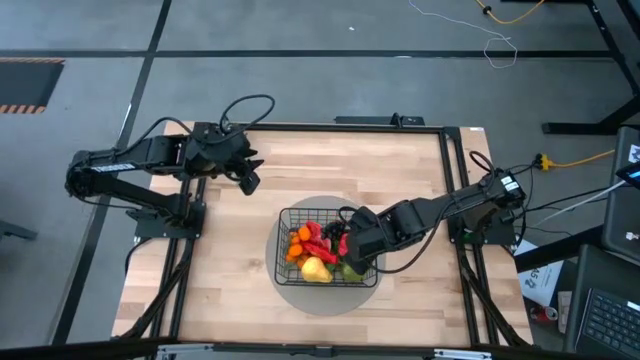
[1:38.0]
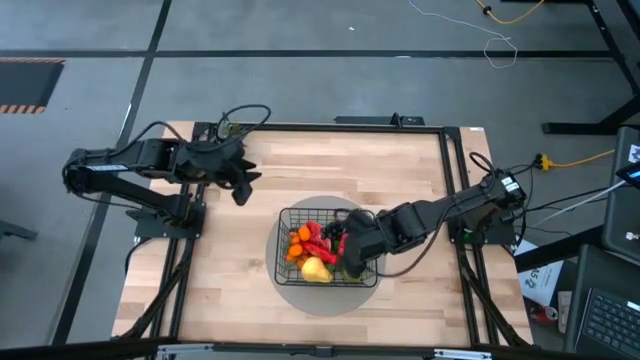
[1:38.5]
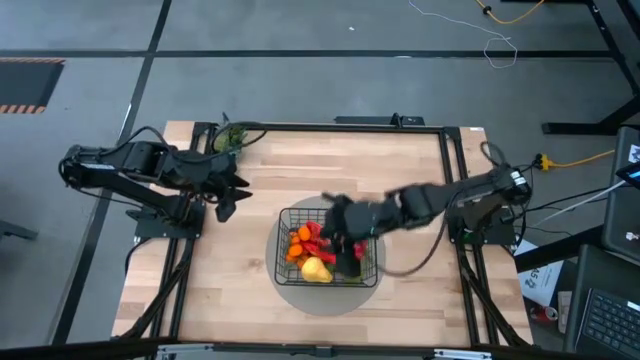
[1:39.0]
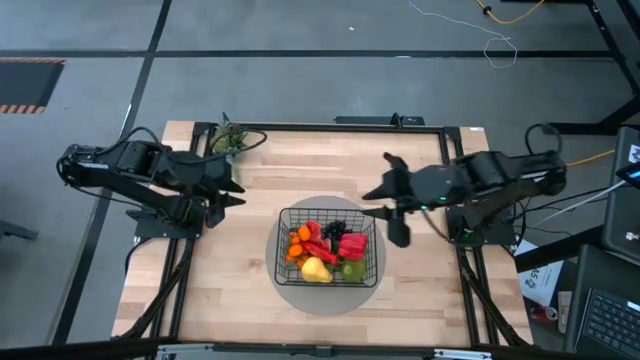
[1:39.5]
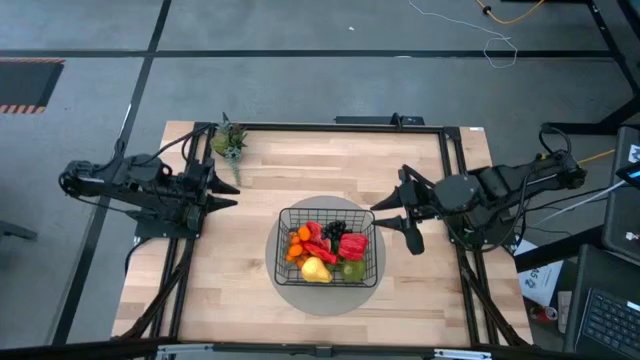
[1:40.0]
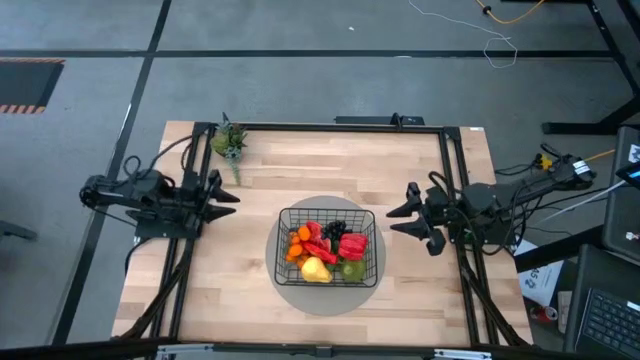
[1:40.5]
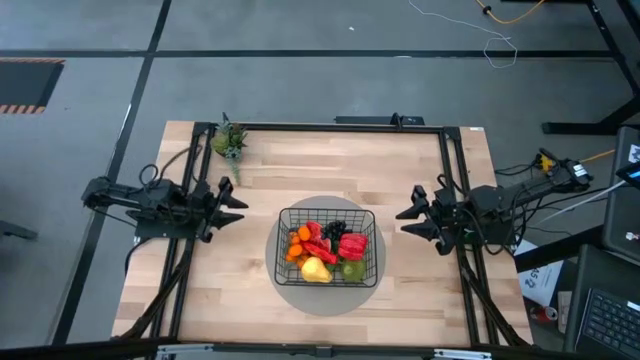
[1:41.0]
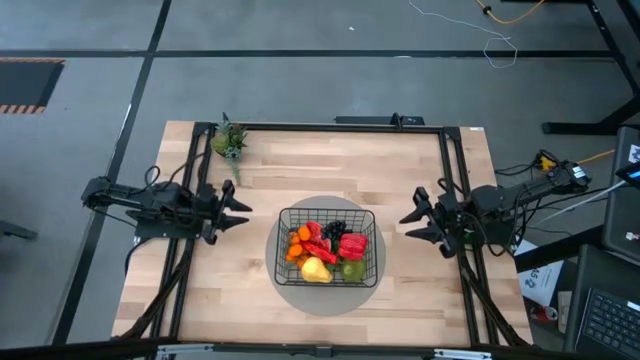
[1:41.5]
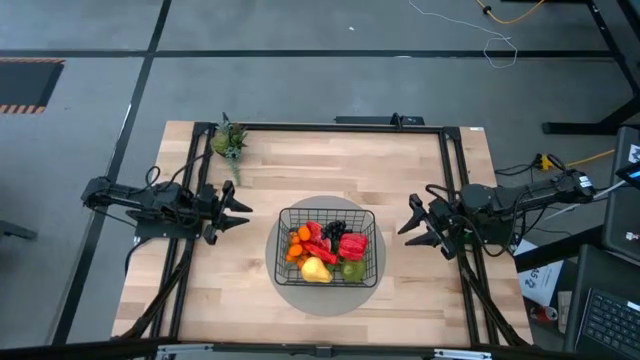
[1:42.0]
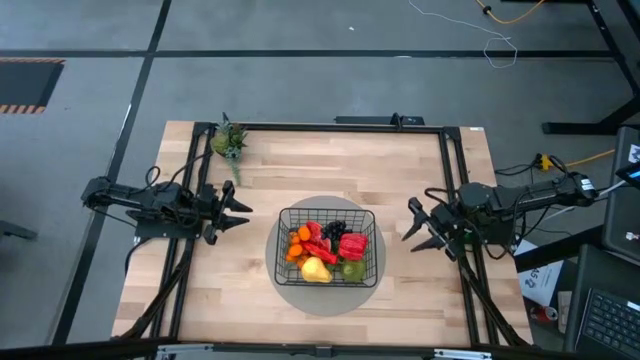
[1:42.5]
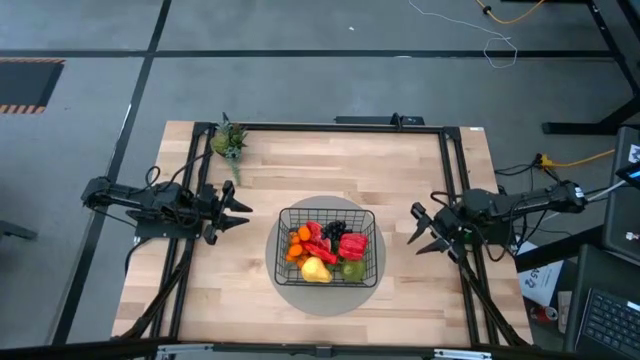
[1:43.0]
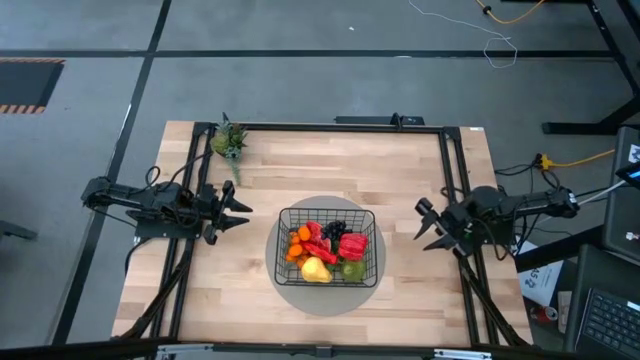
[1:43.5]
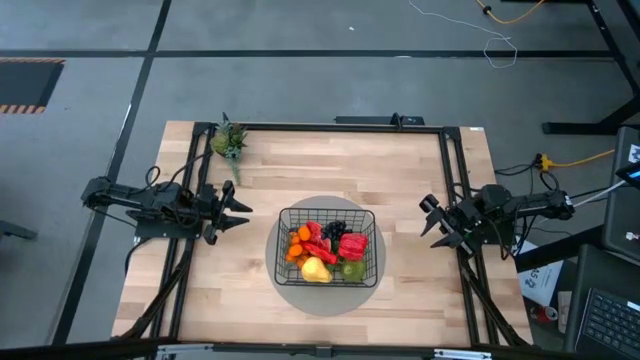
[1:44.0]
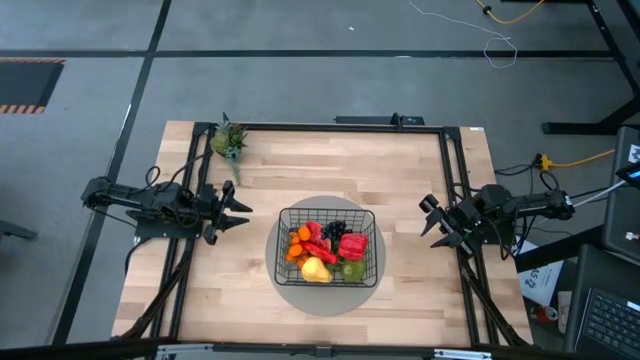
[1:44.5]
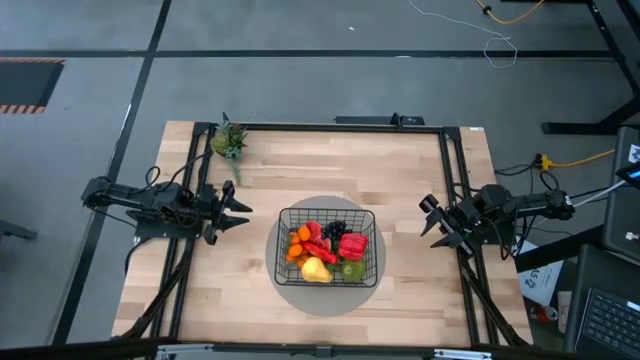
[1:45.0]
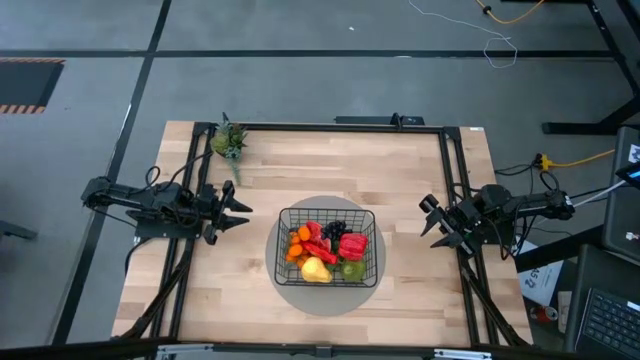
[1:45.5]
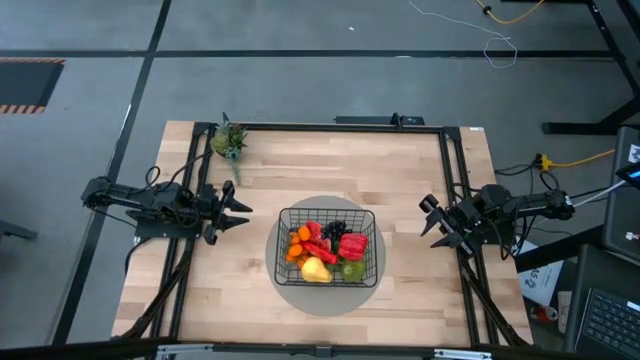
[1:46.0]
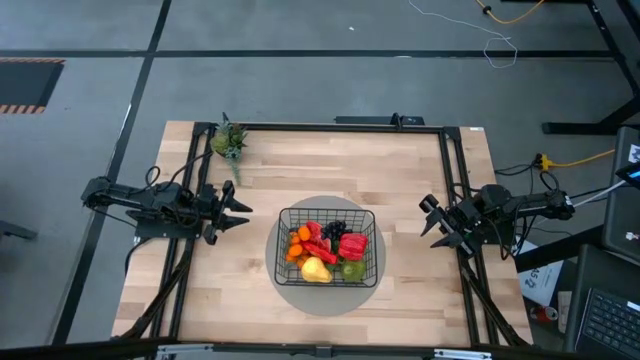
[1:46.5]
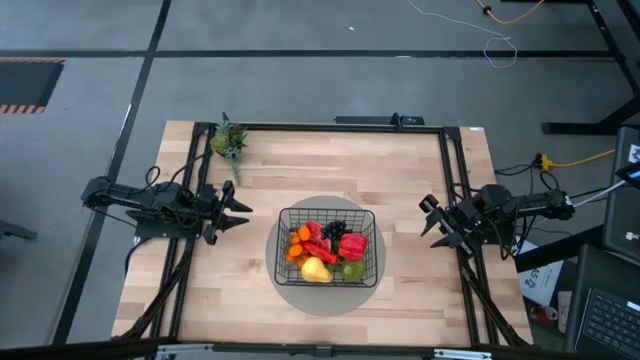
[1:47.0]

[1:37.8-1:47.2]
Task: Build produce basket
Return to Home Position

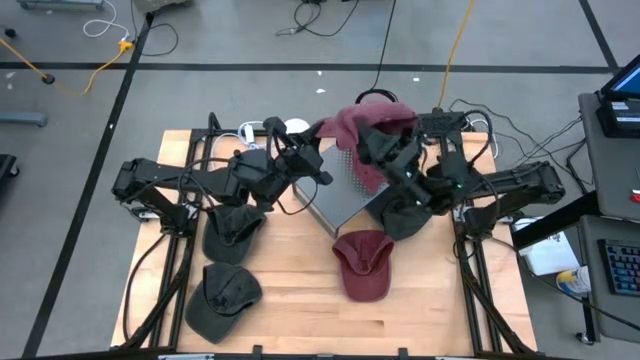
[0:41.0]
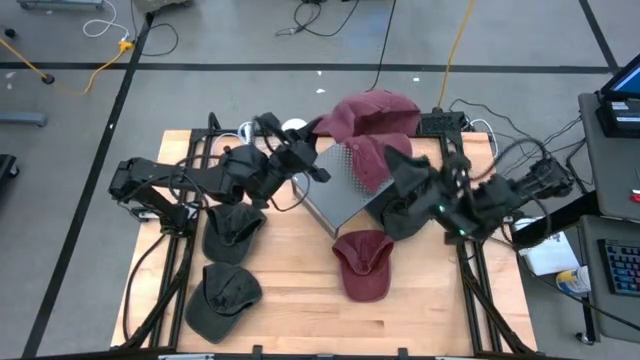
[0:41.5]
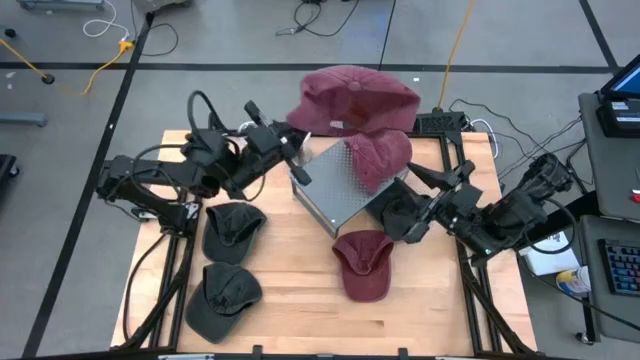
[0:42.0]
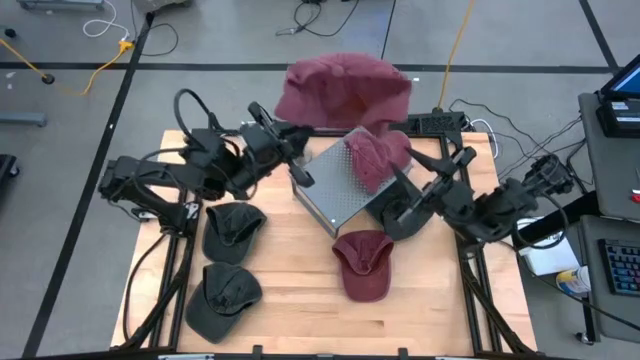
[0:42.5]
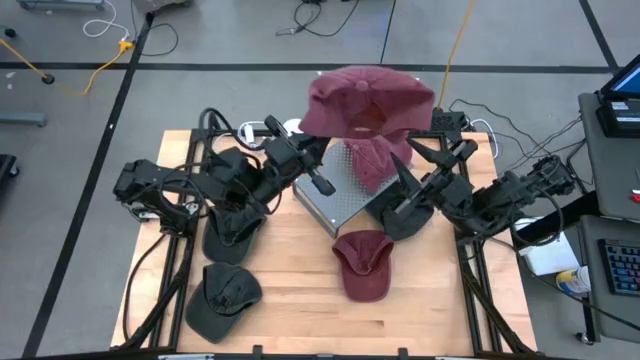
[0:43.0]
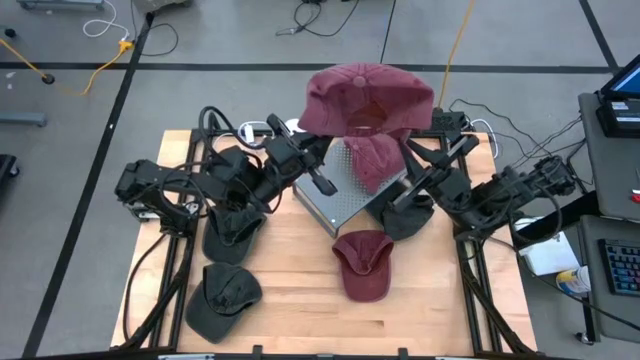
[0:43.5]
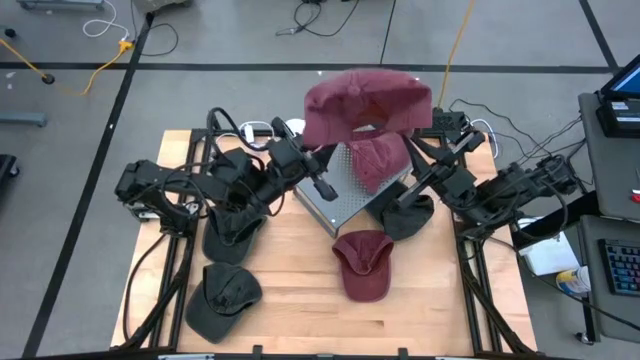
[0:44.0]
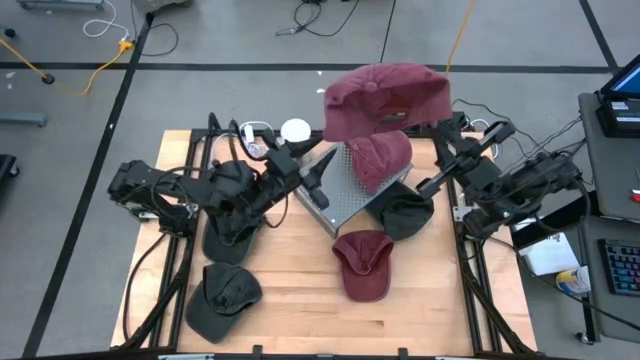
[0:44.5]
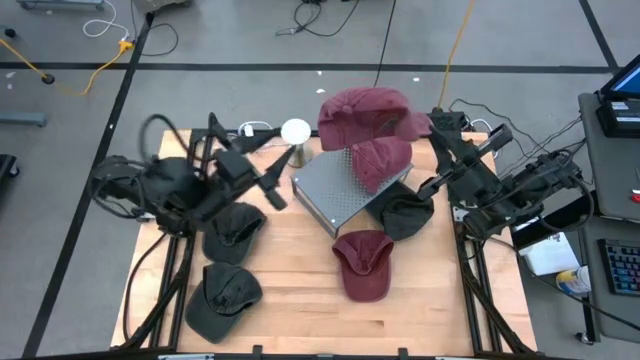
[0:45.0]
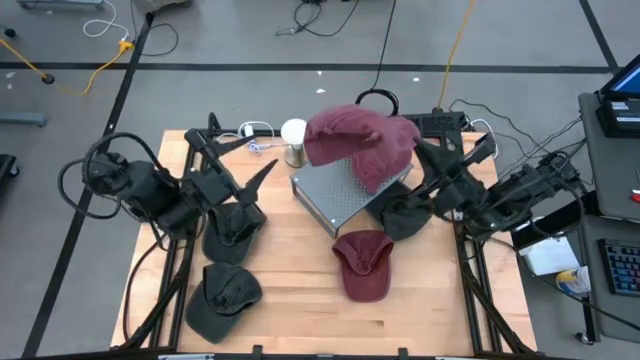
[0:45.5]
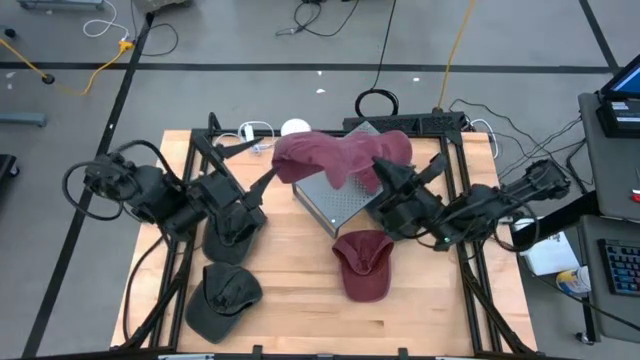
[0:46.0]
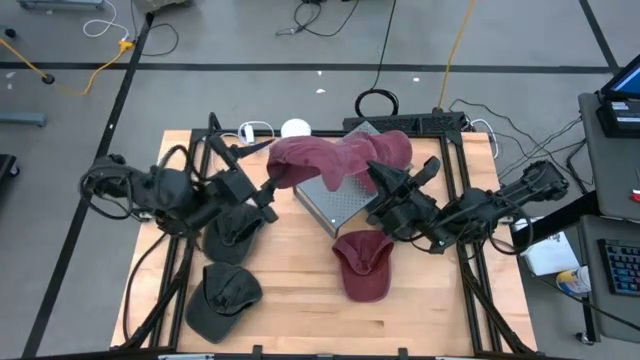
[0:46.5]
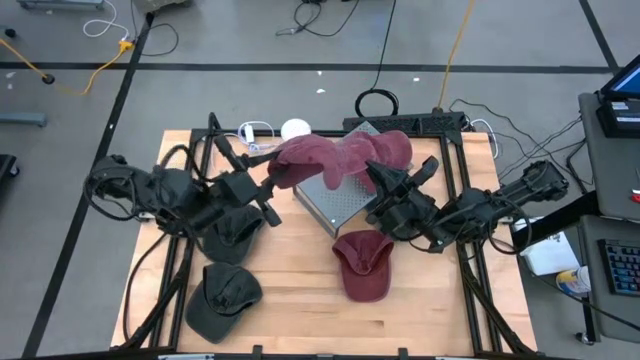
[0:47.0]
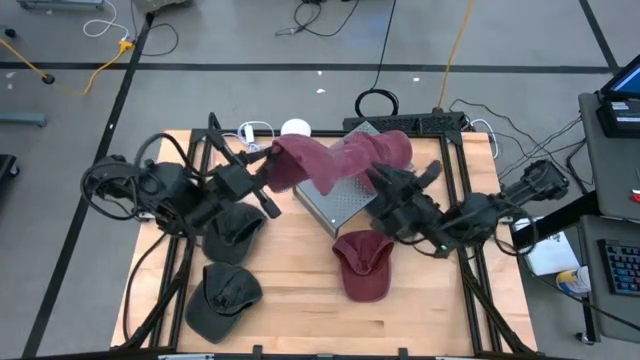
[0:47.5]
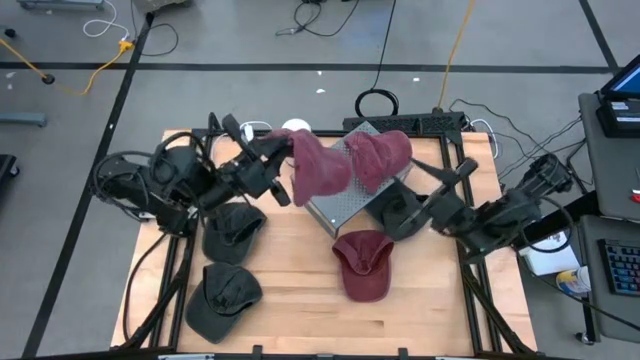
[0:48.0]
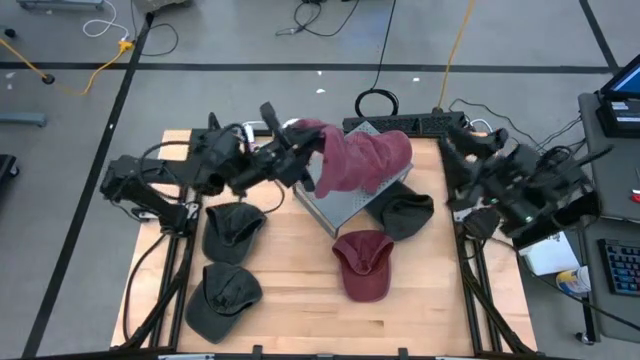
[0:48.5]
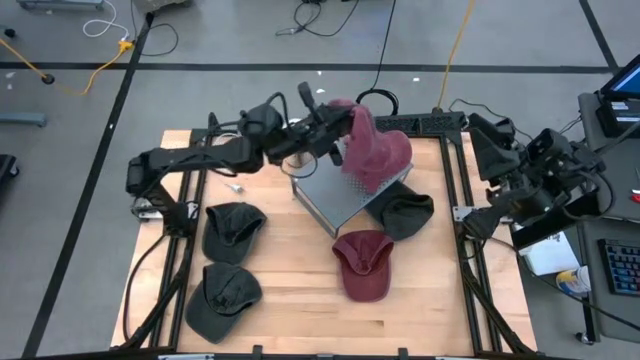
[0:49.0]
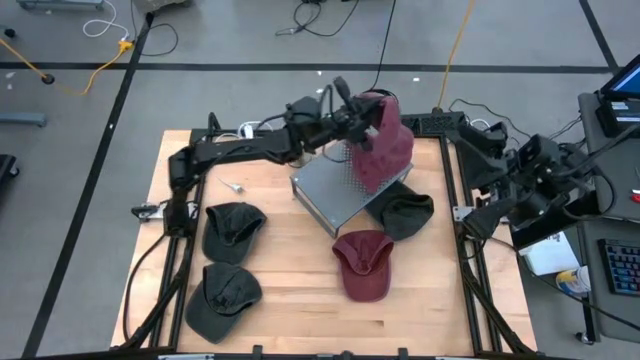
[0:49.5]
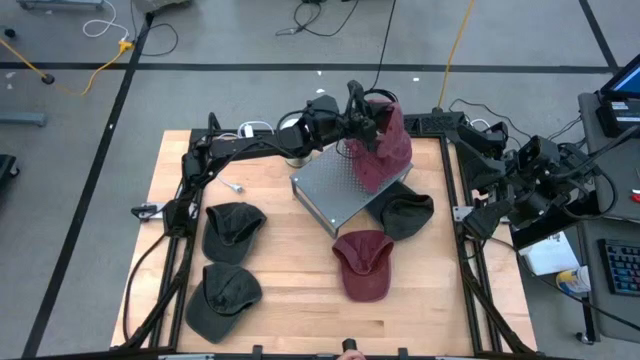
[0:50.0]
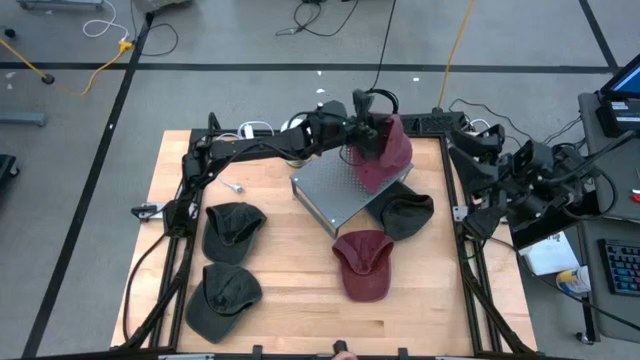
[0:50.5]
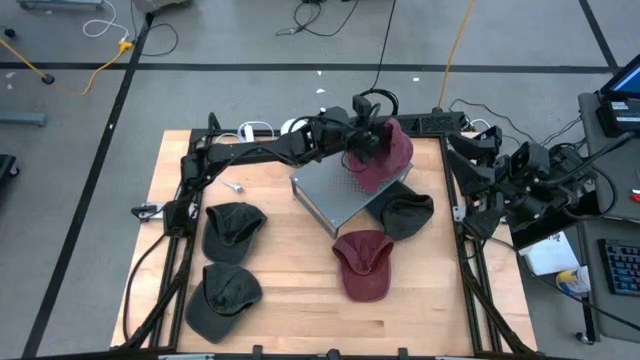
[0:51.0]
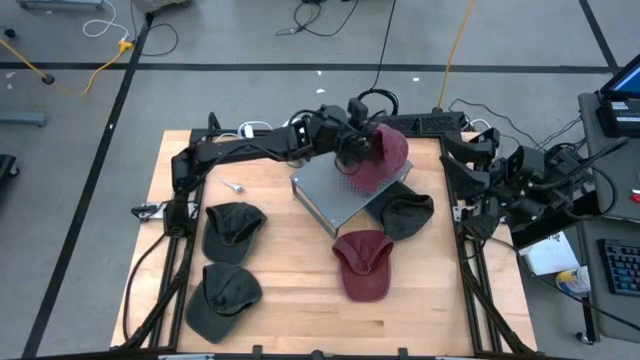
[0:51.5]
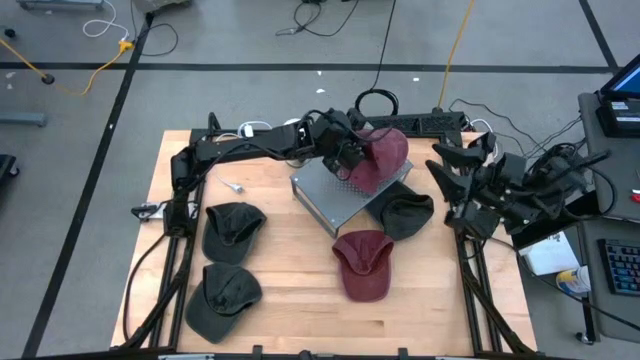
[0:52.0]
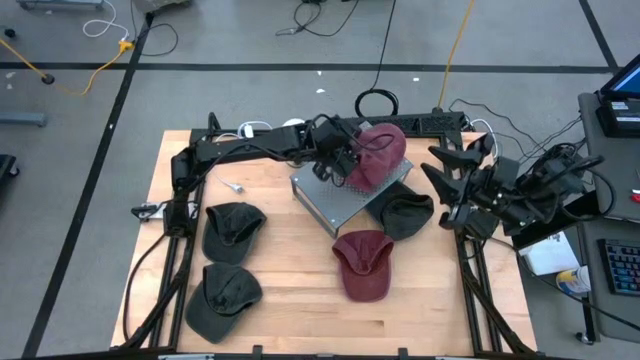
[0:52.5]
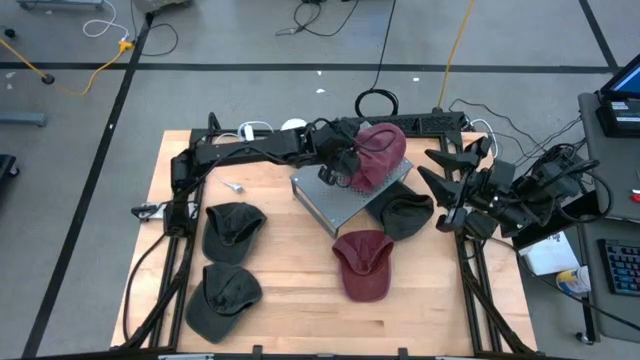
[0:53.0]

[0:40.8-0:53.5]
Task: Pick & Place hat
Stack the left red cap on top of the red cap on the shelf

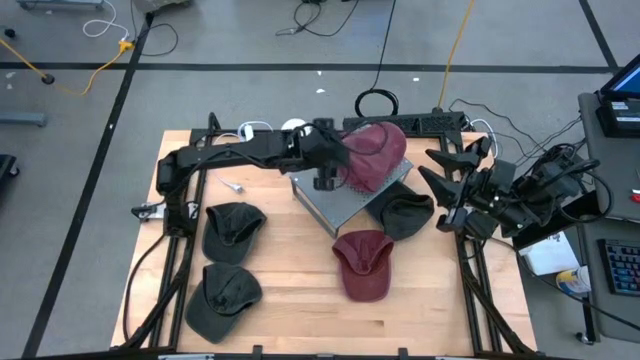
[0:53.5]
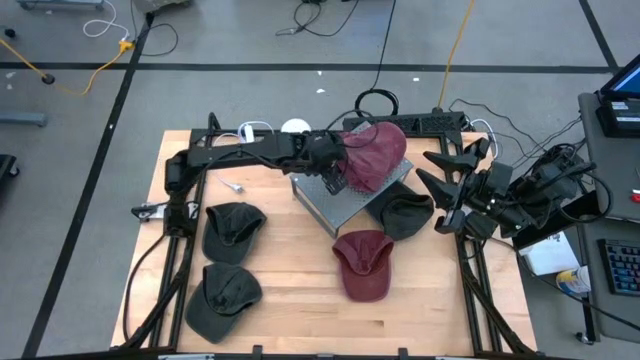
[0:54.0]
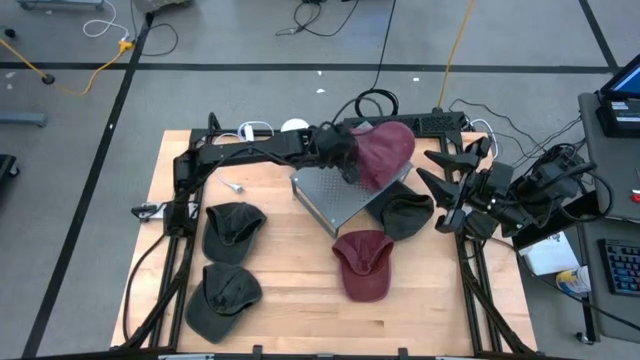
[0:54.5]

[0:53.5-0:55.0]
Adjust the red caps on the shelf
